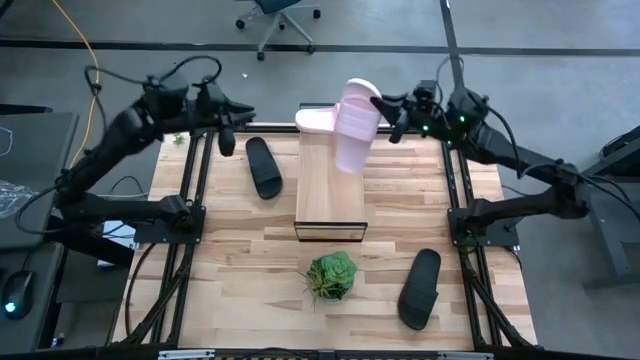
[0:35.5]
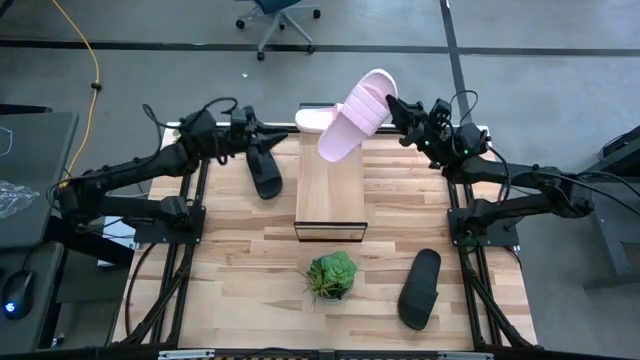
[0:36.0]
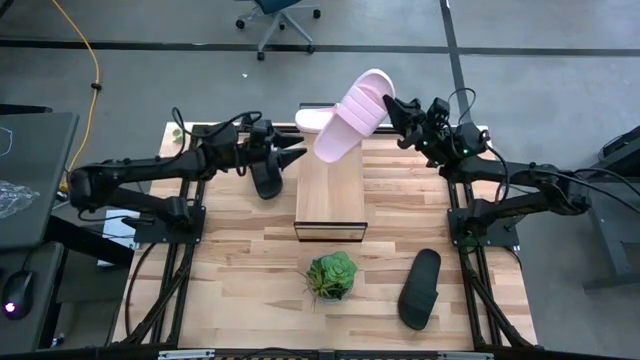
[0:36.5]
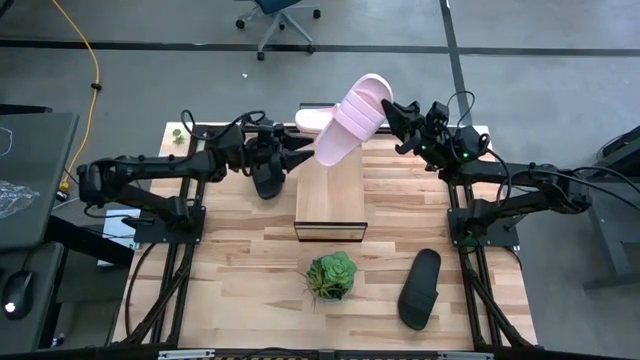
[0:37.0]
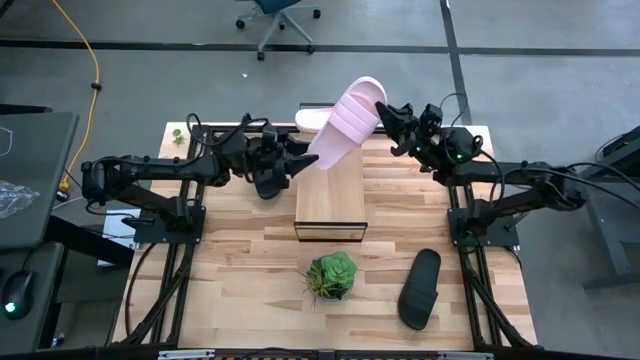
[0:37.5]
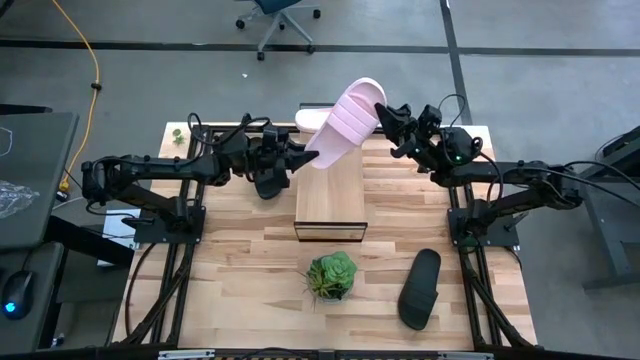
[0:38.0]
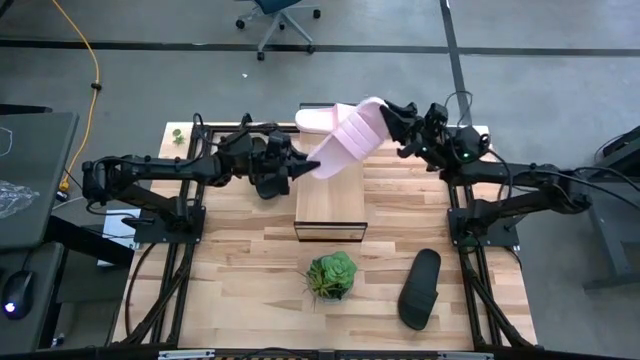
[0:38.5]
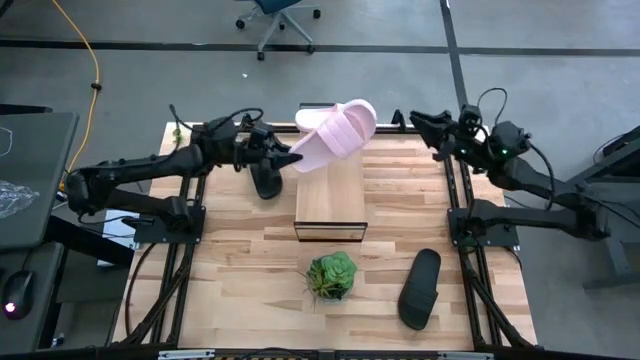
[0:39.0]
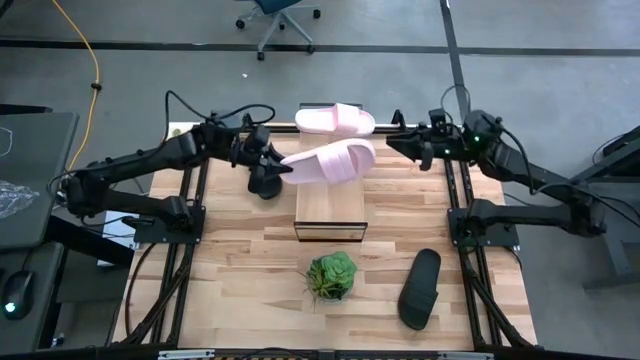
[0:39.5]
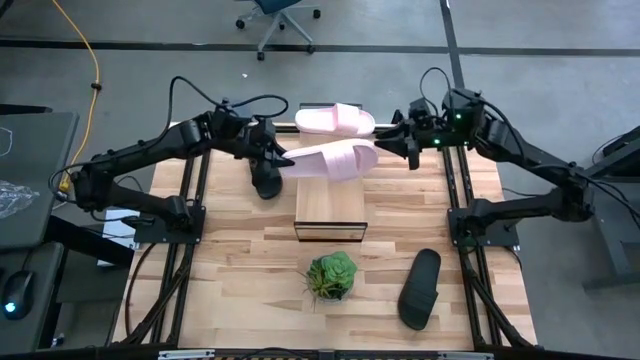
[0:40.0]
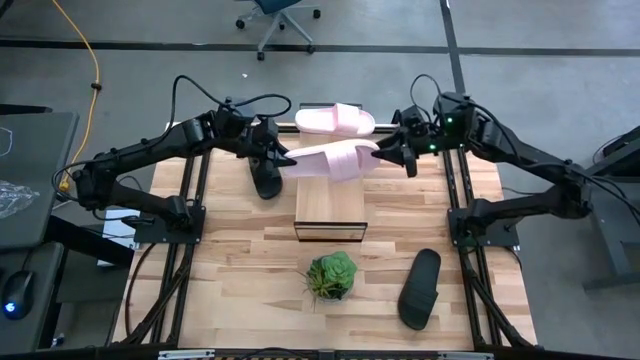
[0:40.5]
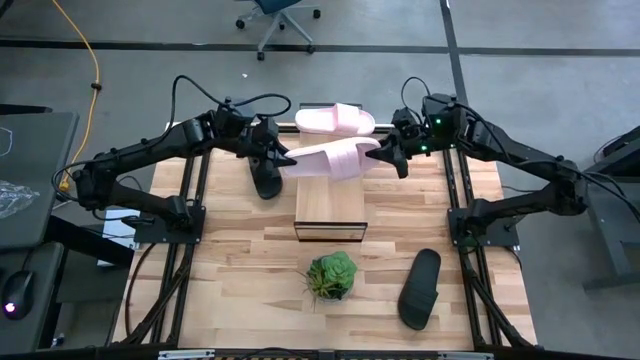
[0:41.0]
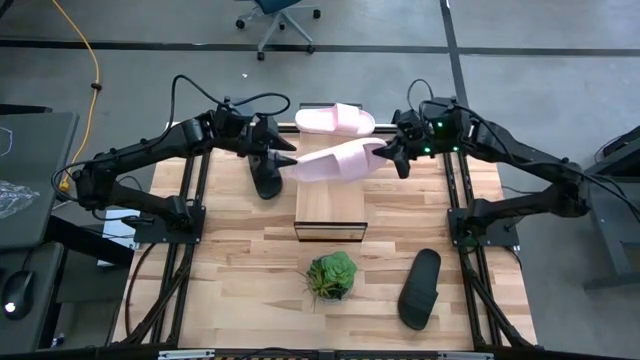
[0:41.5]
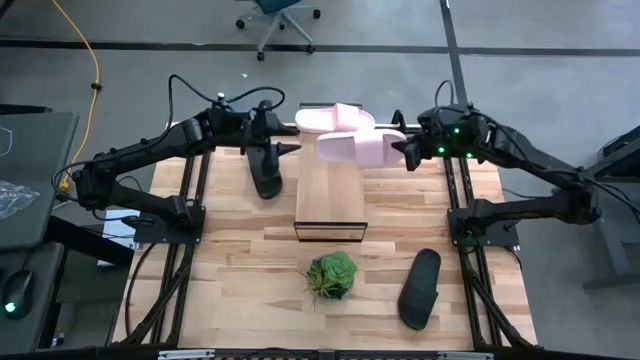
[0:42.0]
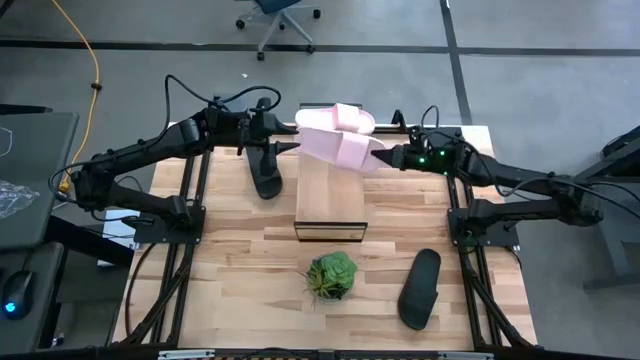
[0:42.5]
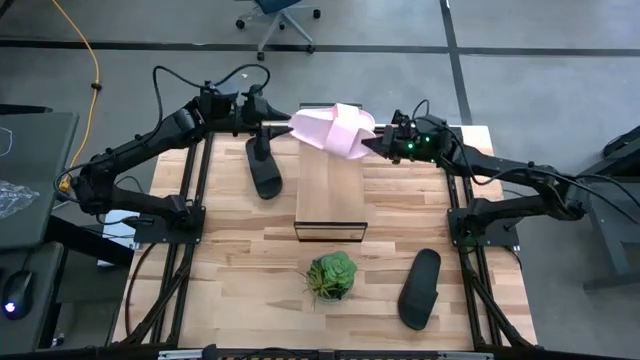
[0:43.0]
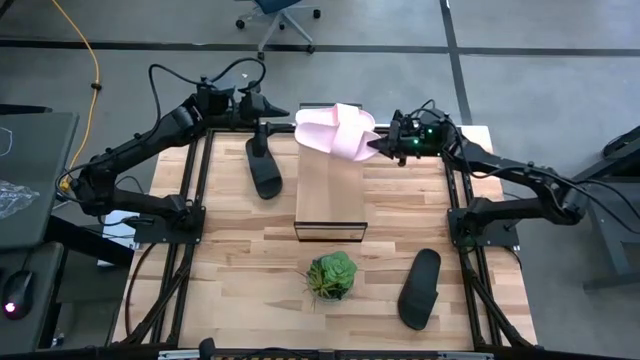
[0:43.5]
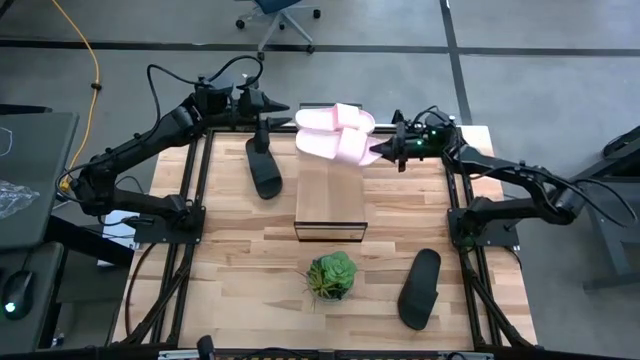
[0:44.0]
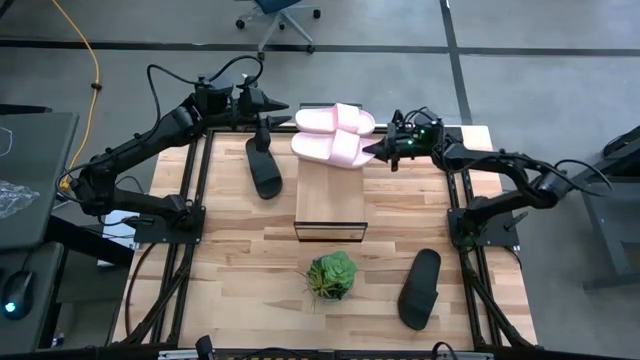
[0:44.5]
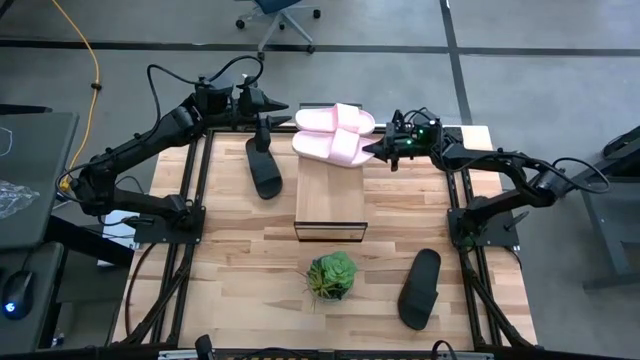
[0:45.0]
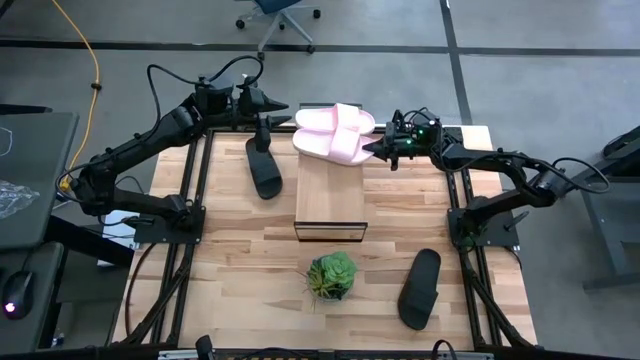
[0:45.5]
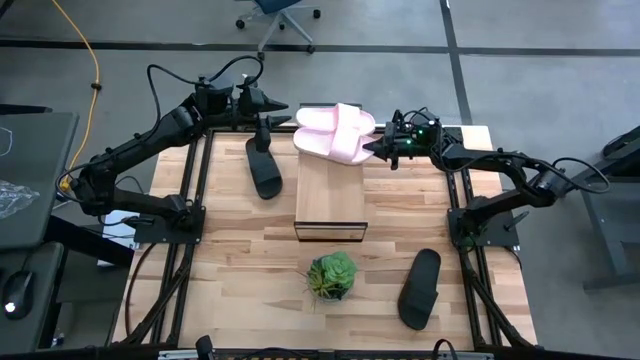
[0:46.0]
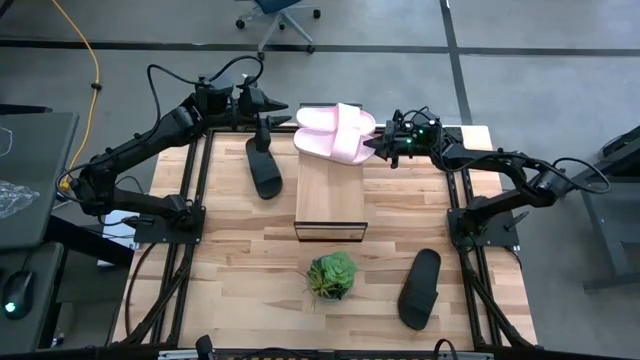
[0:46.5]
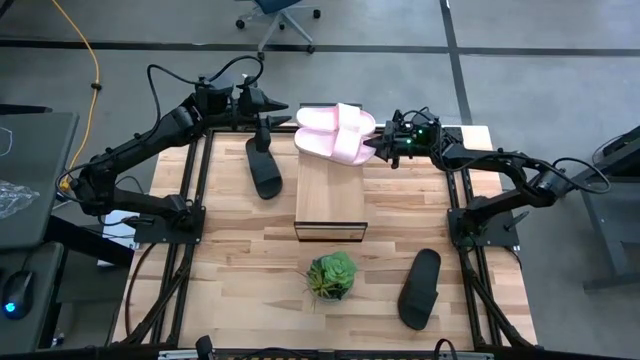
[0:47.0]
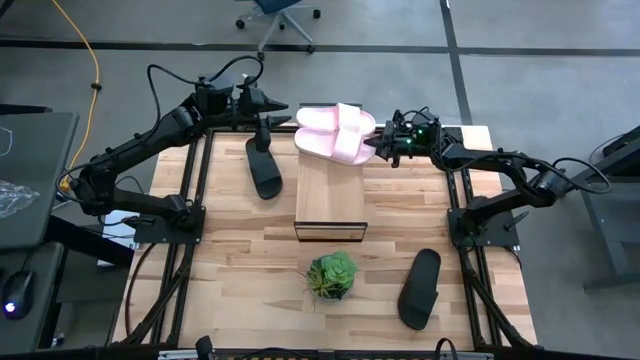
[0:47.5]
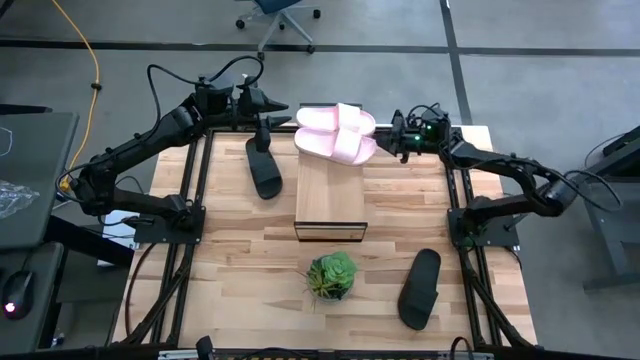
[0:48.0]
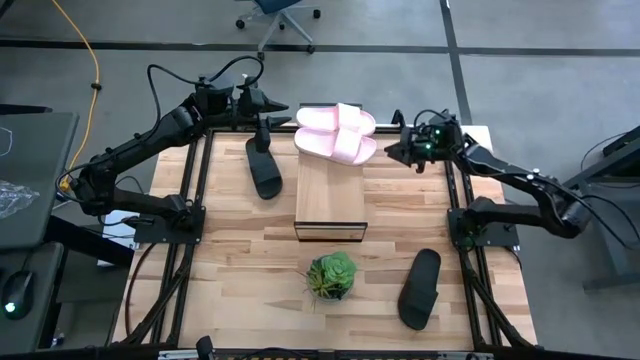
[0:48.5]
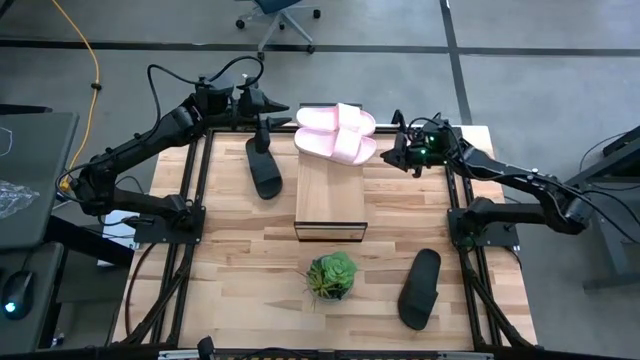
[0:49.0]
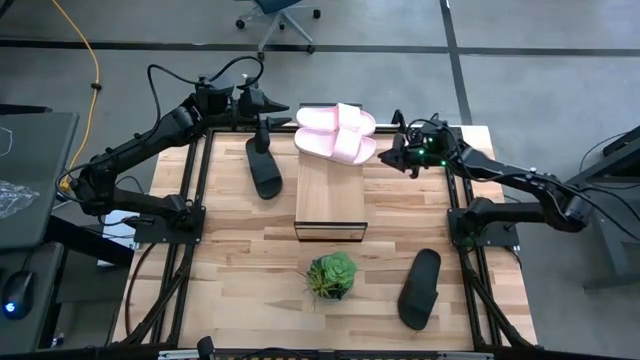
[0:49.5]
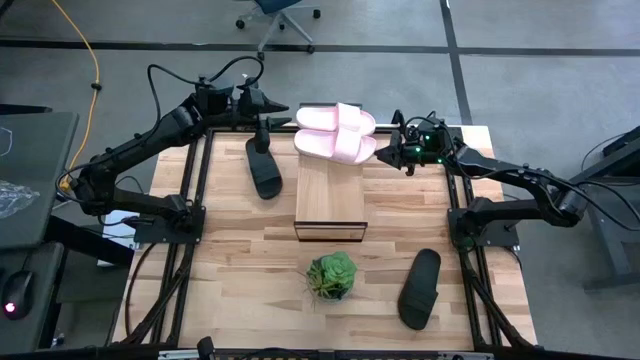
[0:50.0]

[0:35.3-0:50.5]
Task: Pick and place slides into the shelf
Put the pink slide on the shelf
